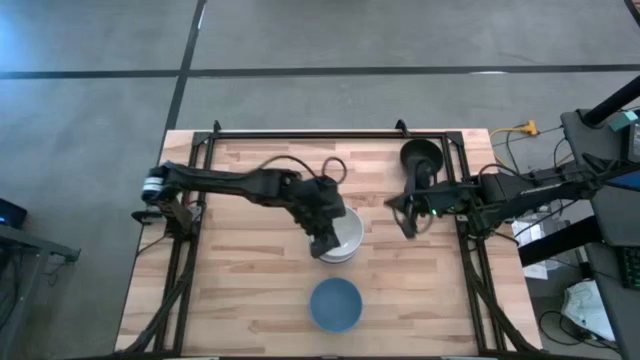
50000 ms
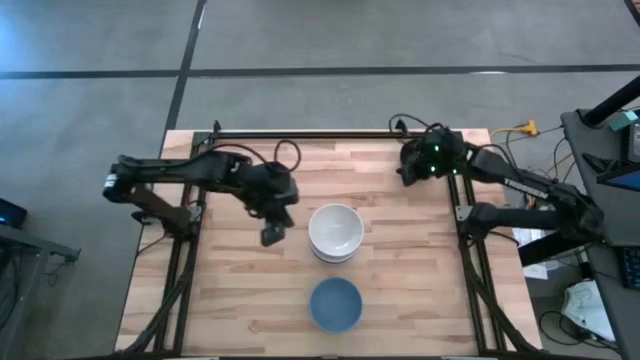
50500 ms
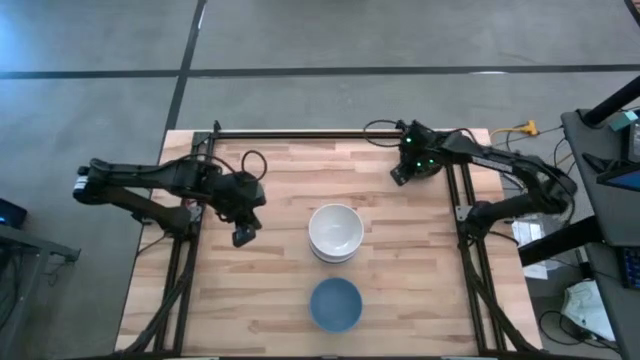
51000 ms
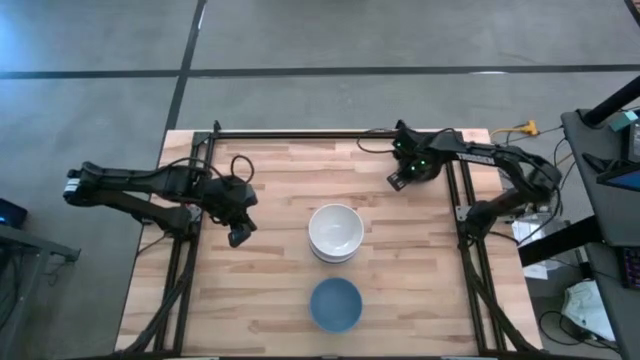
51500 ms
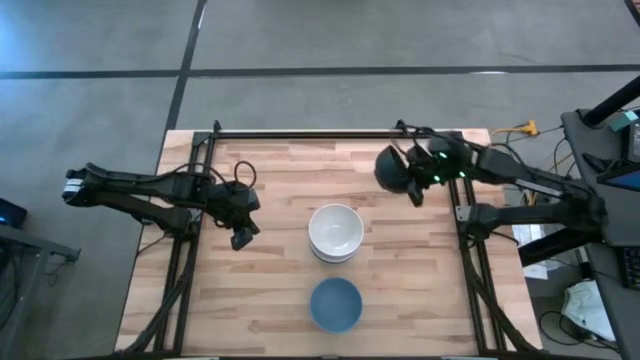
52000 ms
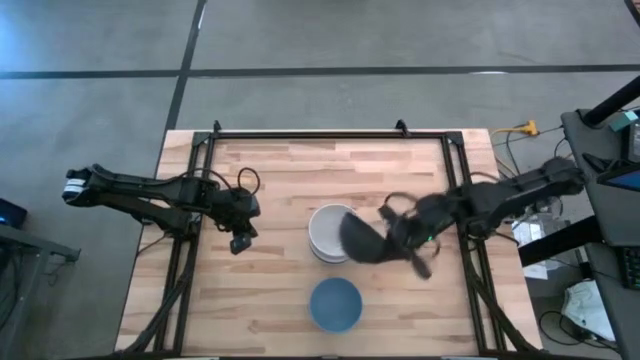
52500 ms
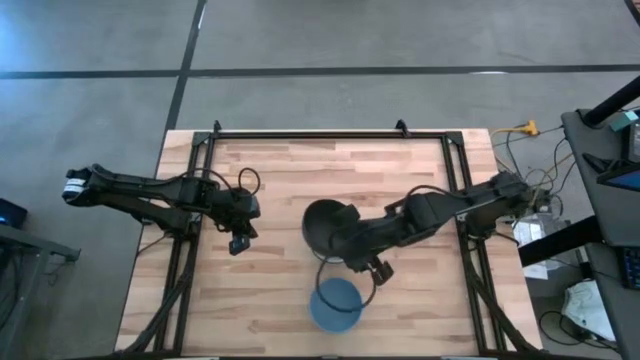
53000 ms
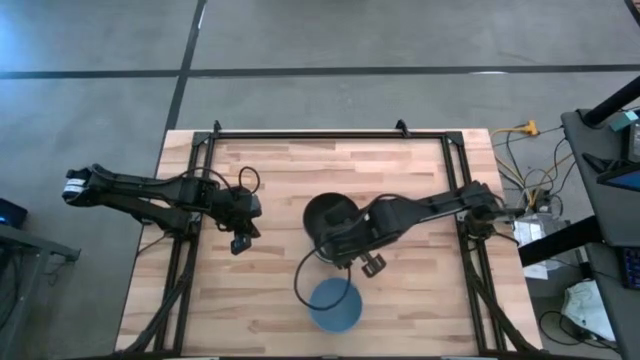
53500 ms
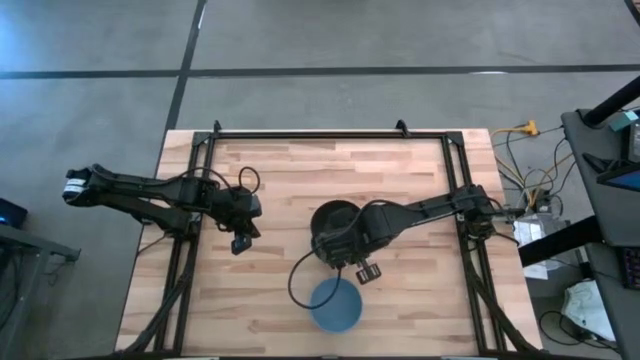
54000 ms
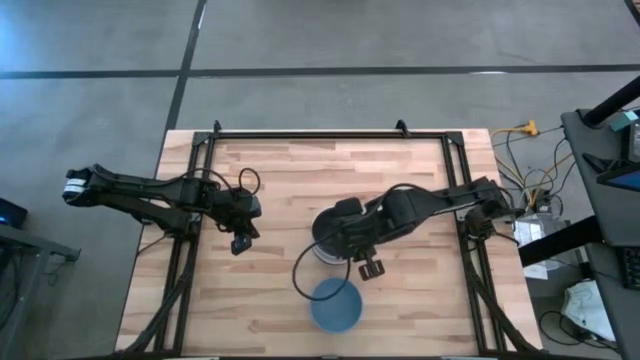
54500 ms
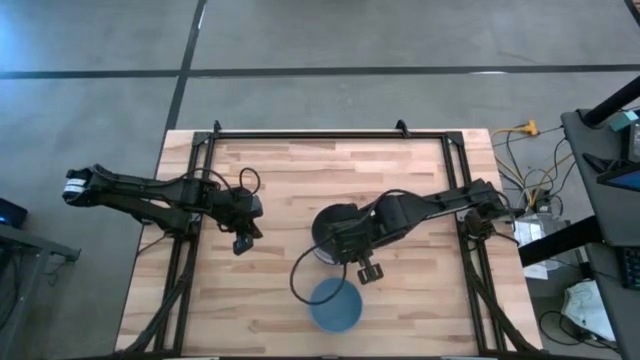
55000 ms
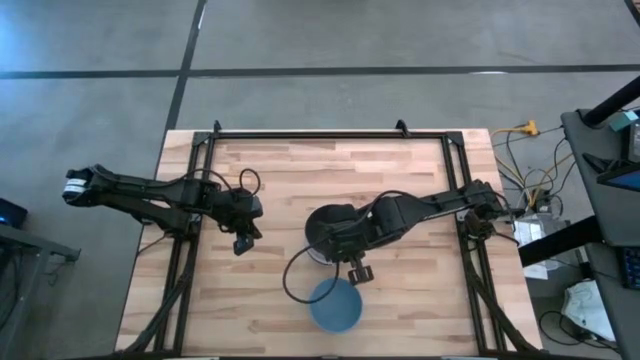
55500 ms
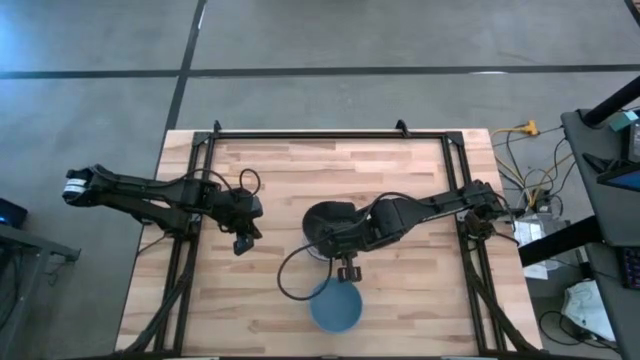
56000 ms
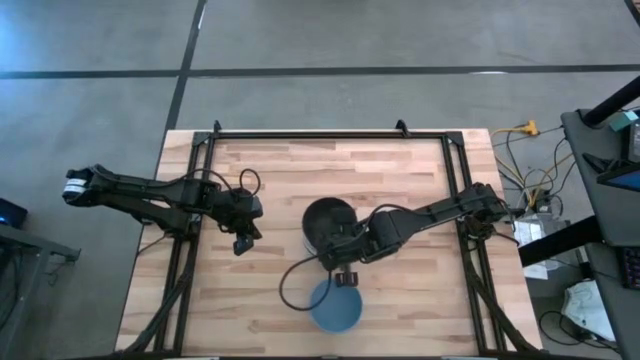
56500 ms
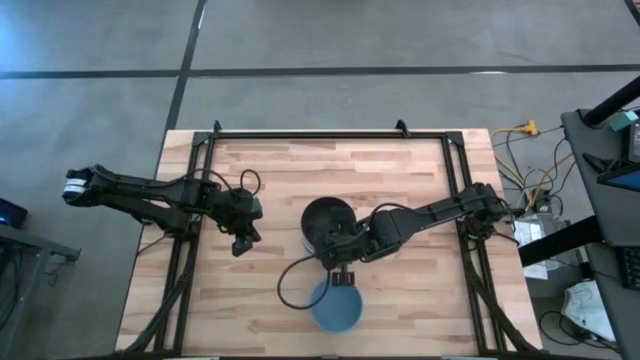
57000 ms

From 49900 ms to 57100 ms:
Task: Nest bowls inside each other
Stack the black bowl on top of the stacked white bowl

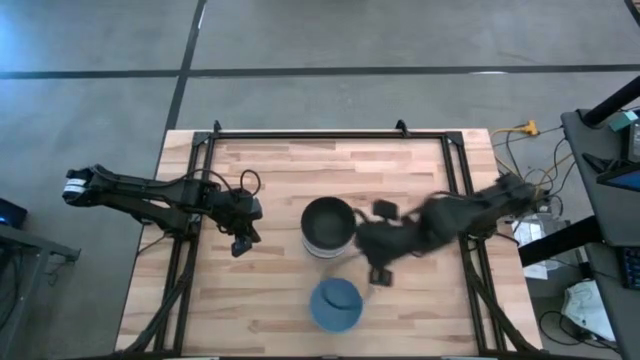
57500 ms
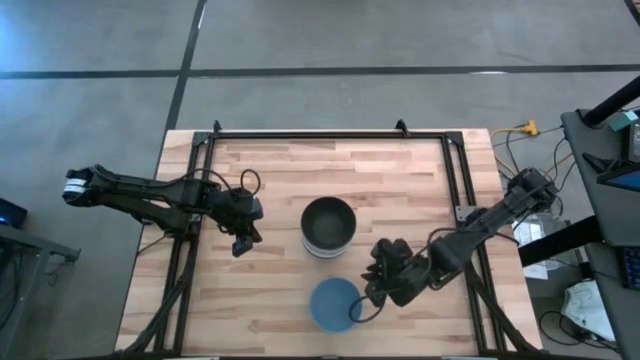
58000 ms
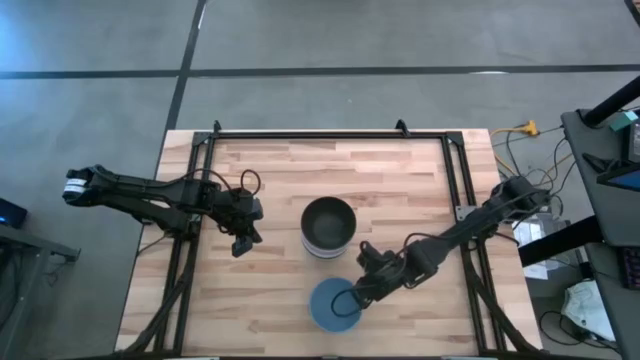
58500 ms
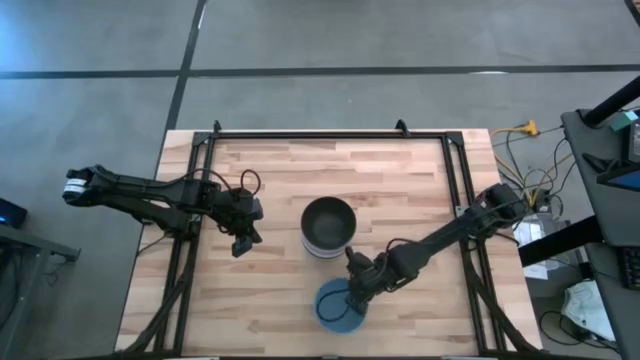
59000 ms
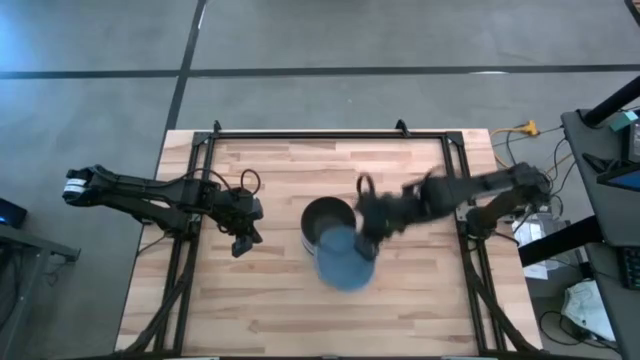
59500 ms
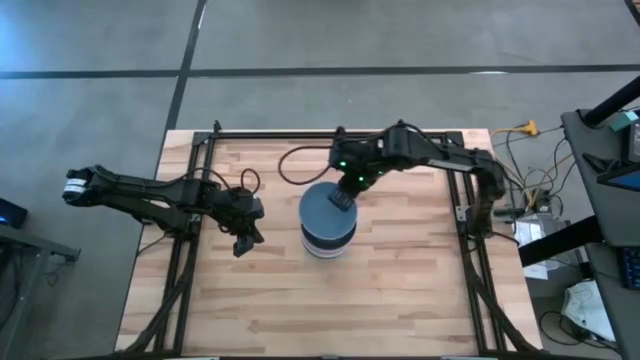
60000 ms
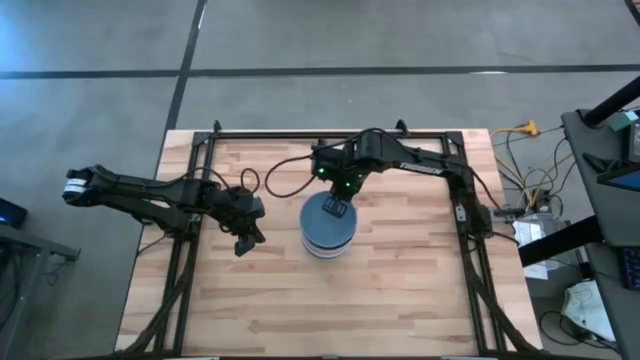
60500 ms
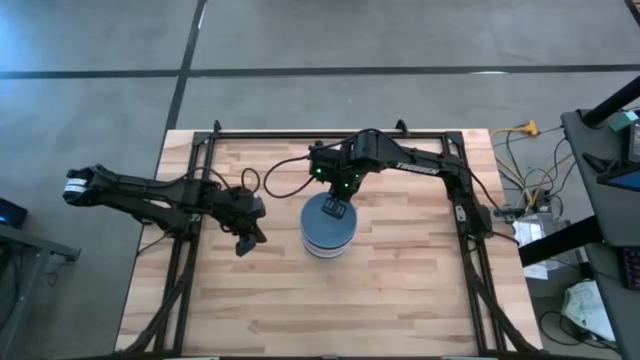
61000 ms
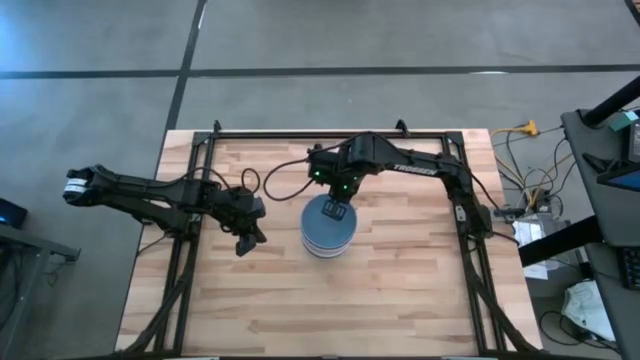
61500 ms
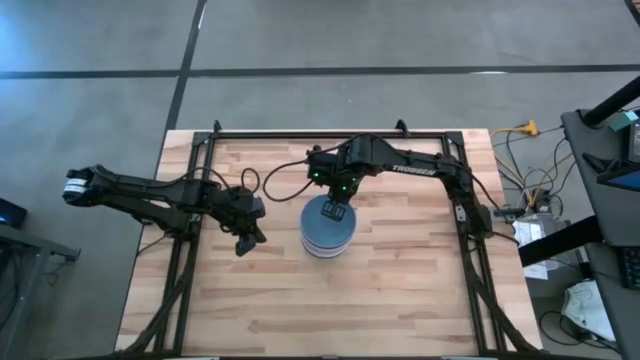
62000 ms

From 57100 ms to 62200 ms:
Stack the blue bowl on top of the stacked black bowl

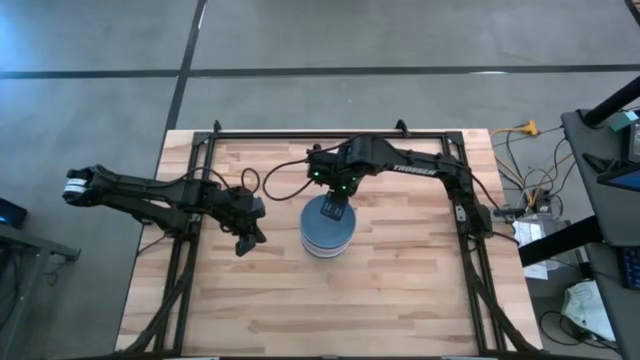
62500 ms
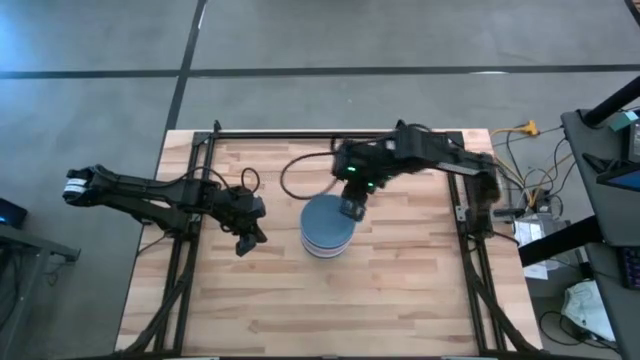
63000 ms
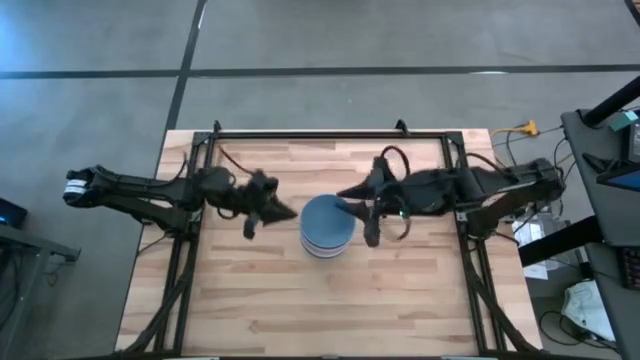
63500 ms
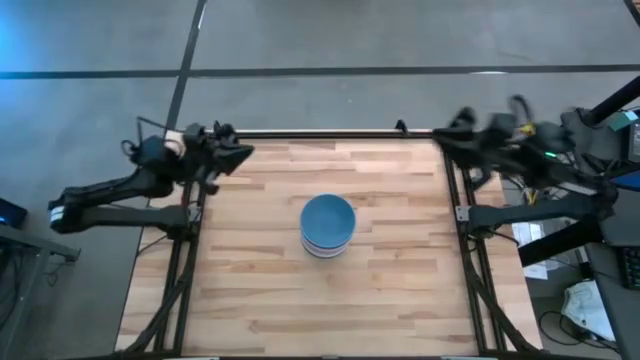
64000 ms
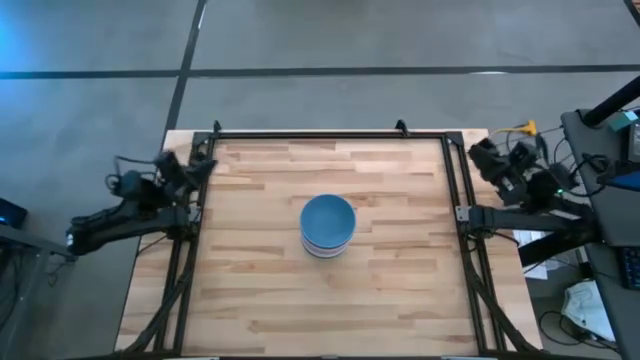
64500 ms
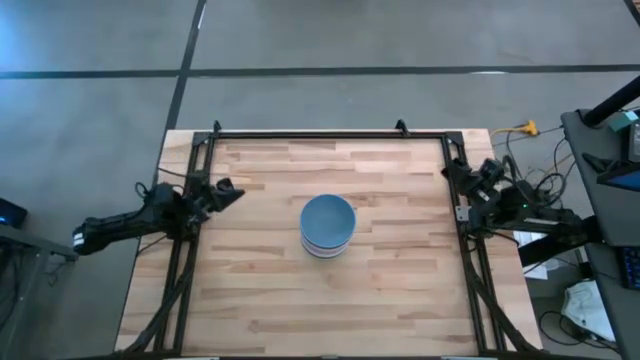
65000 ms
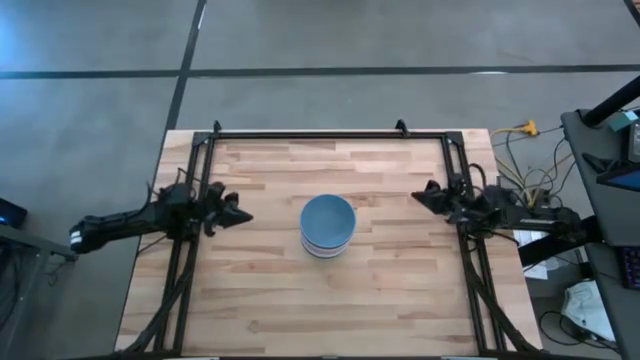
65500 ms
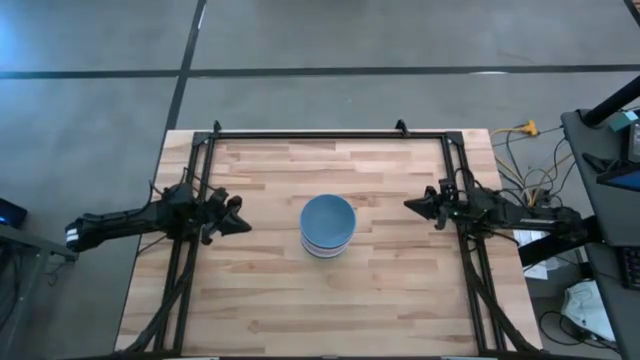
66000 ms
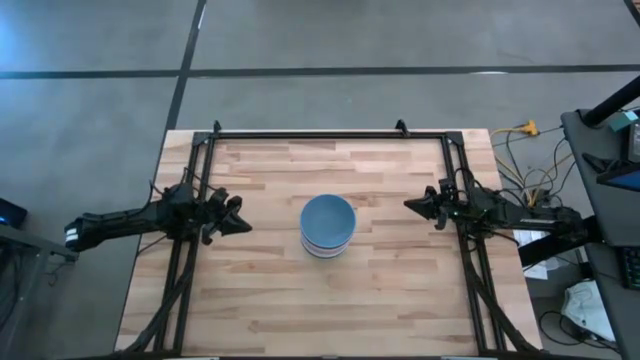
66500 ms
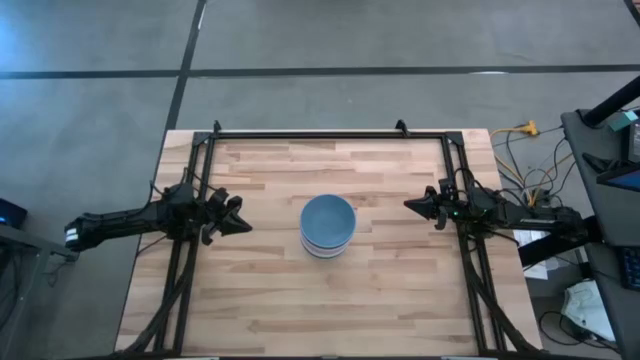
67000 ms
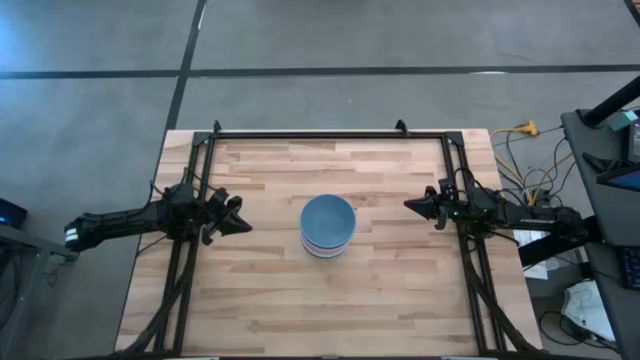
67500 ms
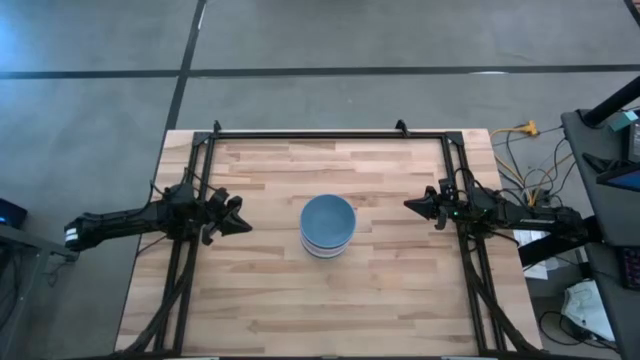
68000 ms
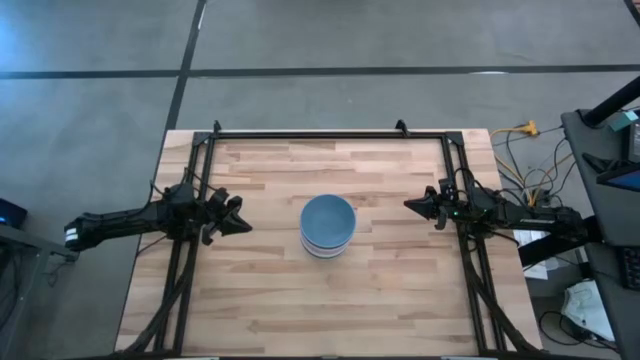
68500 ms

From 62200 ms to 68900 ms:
Return to Home Position

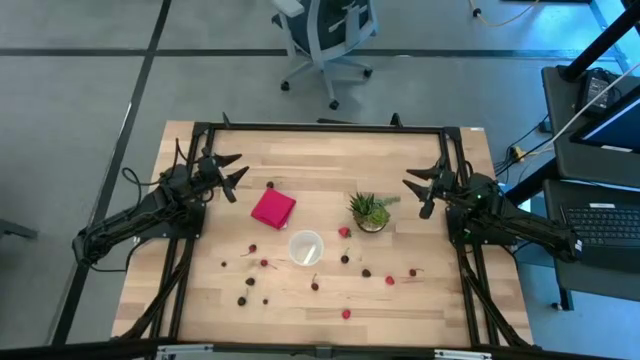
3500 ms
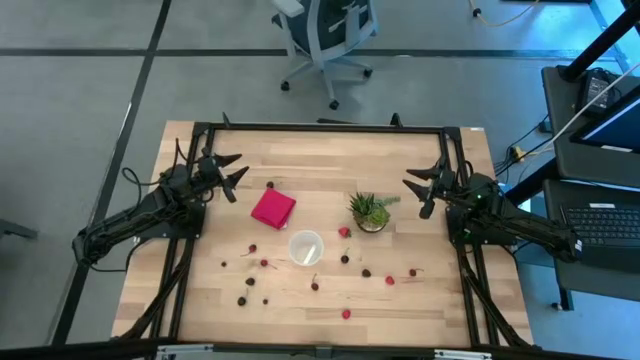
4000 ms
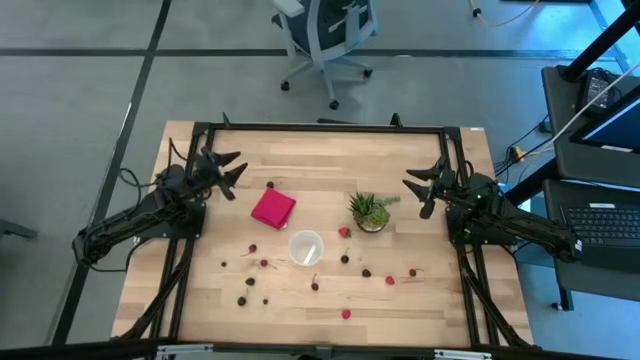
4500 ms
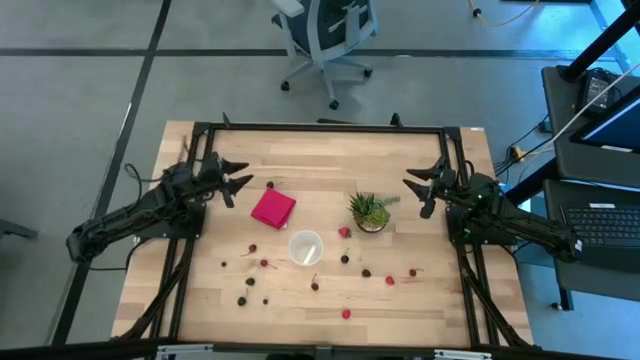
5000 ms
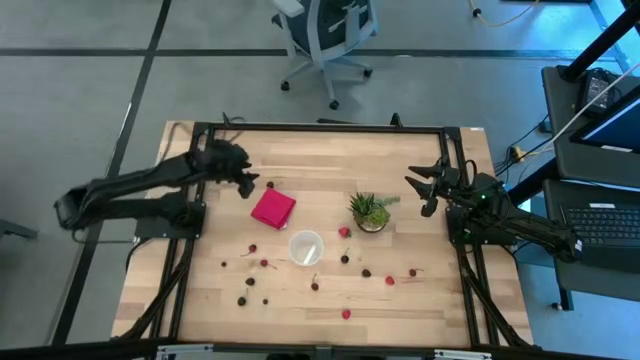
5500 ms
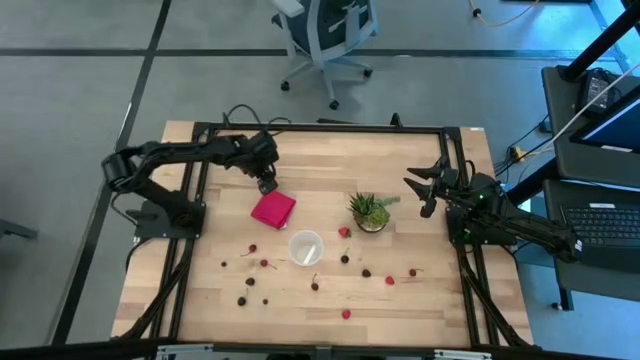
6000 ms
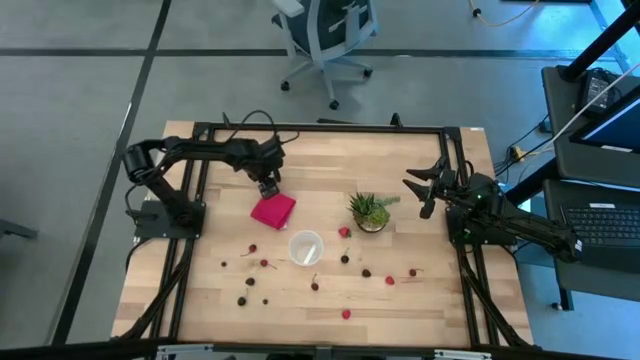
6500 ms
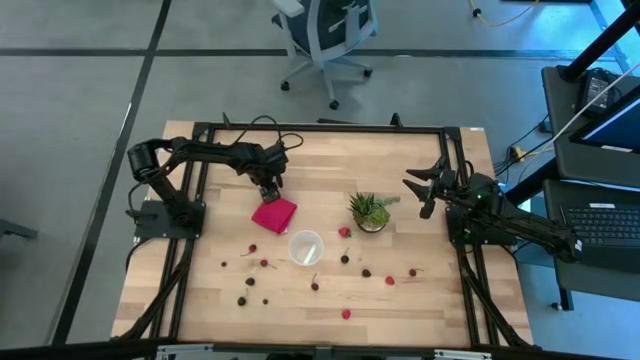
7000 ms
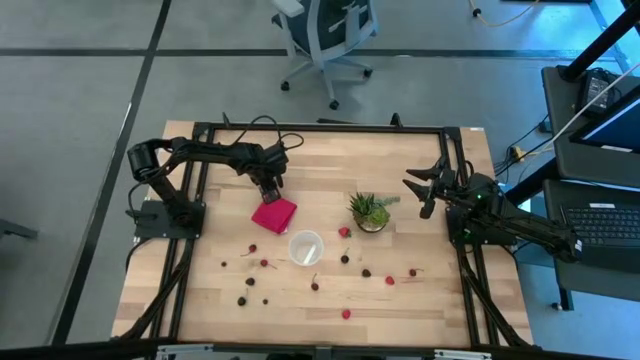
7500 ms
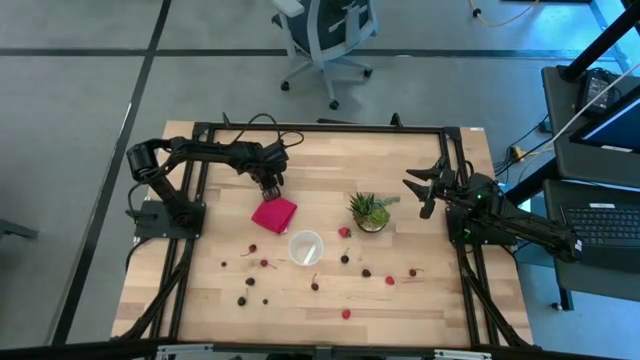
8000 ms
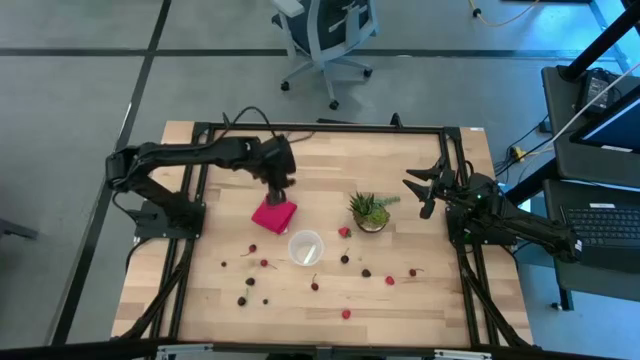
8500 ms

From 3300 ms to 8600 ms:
Task: Pick and placing Produce into tupperware
Put the black cherry into the container
